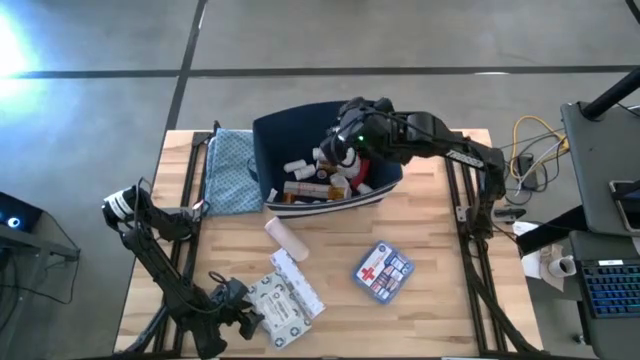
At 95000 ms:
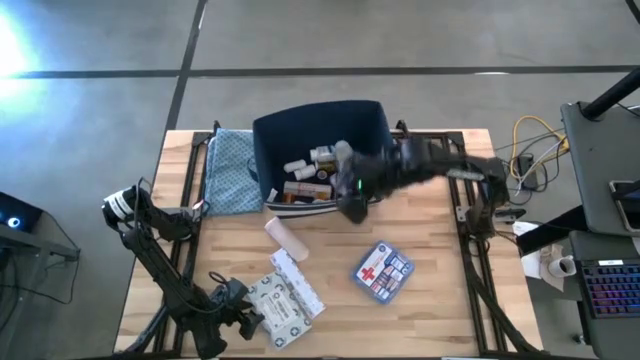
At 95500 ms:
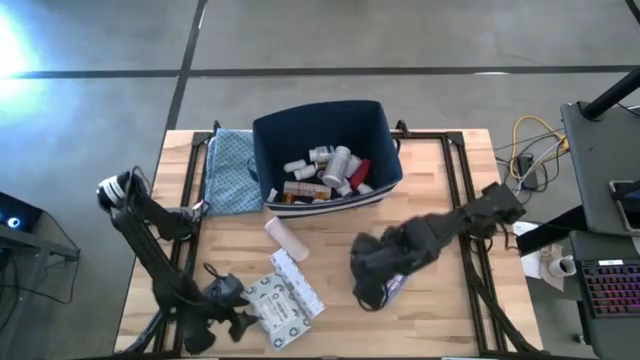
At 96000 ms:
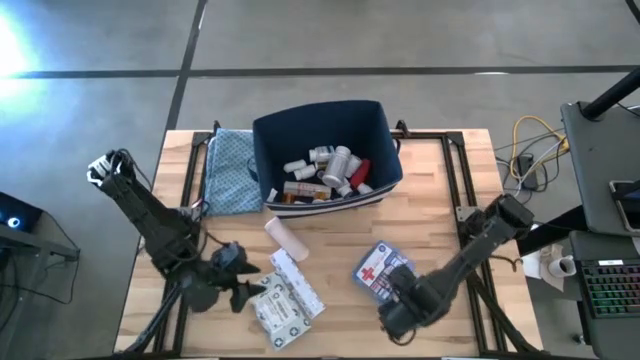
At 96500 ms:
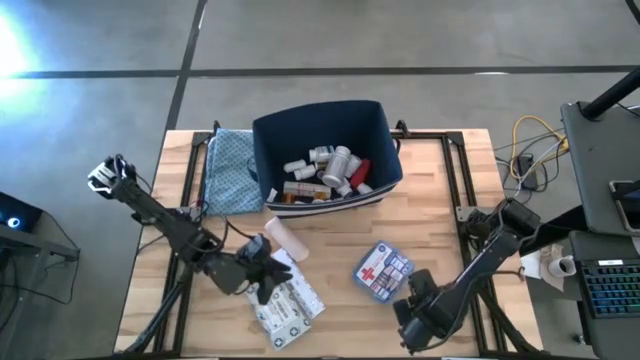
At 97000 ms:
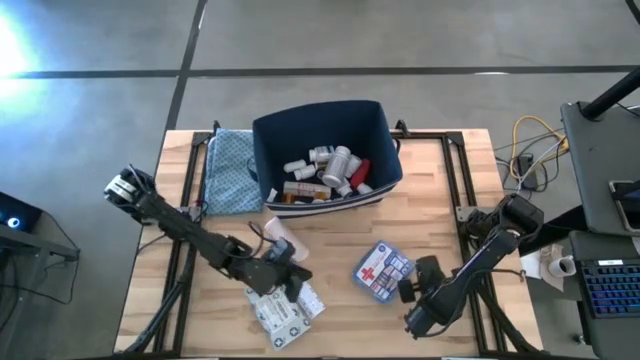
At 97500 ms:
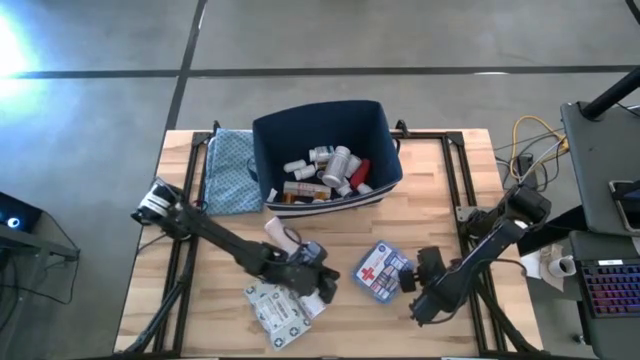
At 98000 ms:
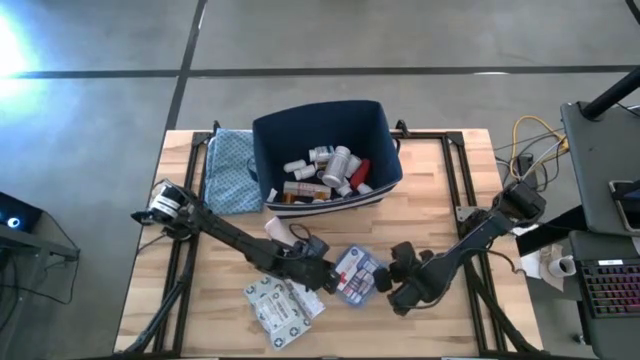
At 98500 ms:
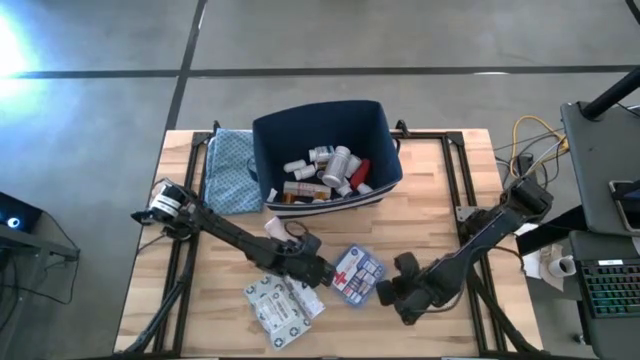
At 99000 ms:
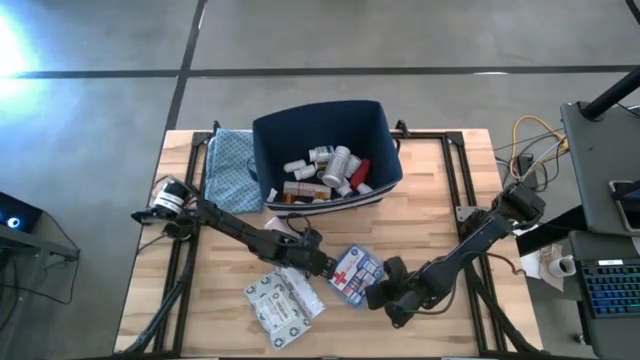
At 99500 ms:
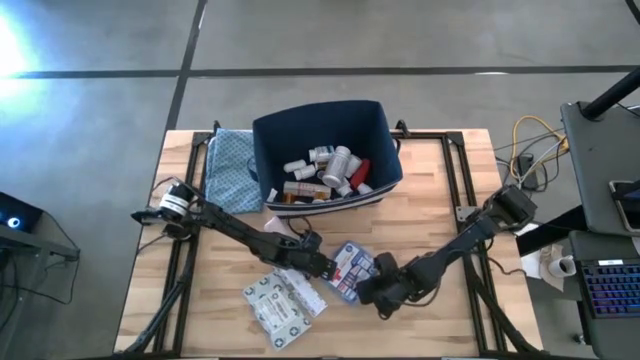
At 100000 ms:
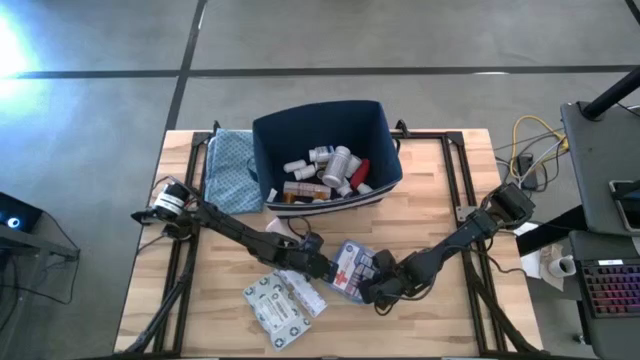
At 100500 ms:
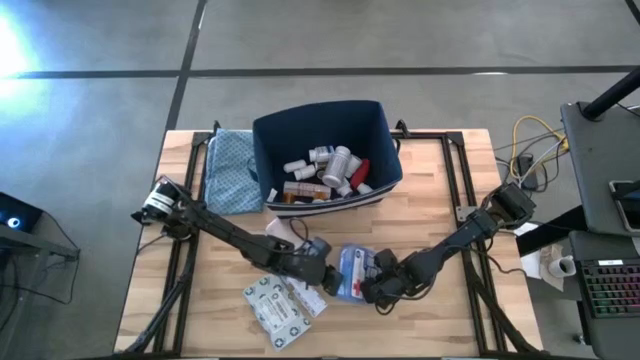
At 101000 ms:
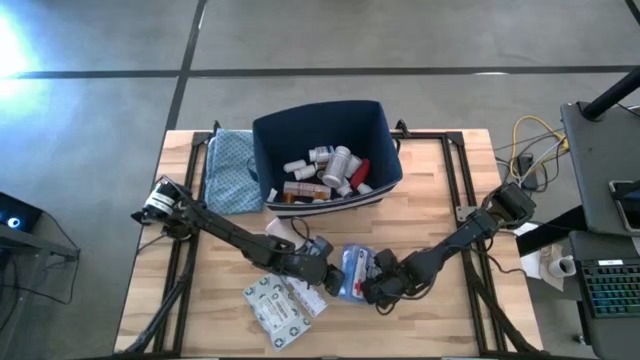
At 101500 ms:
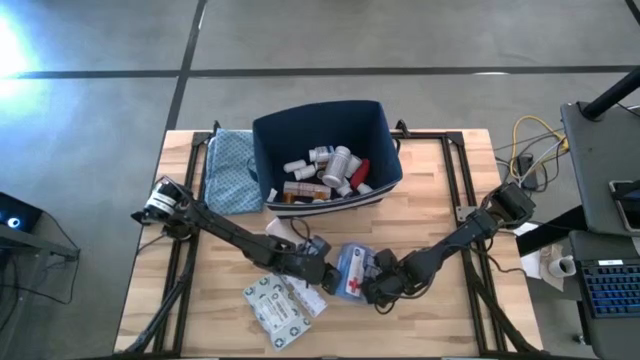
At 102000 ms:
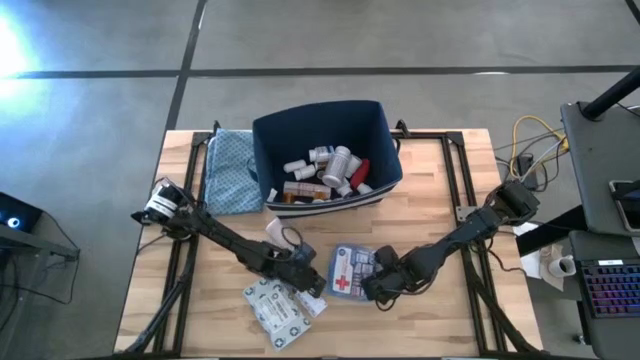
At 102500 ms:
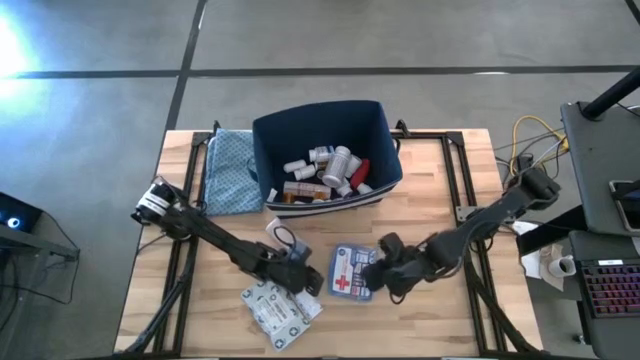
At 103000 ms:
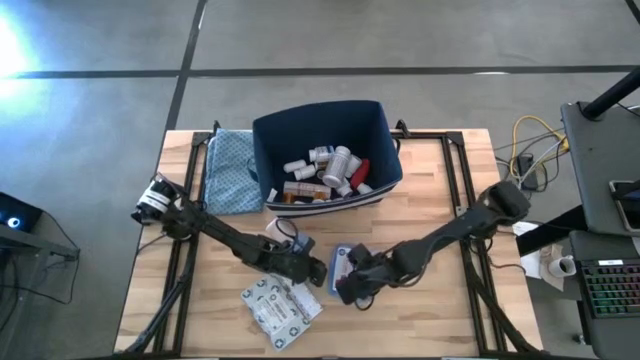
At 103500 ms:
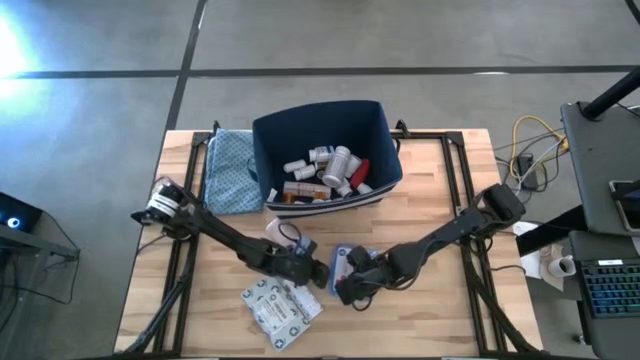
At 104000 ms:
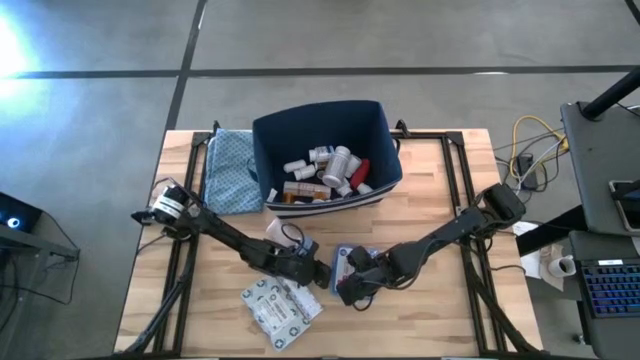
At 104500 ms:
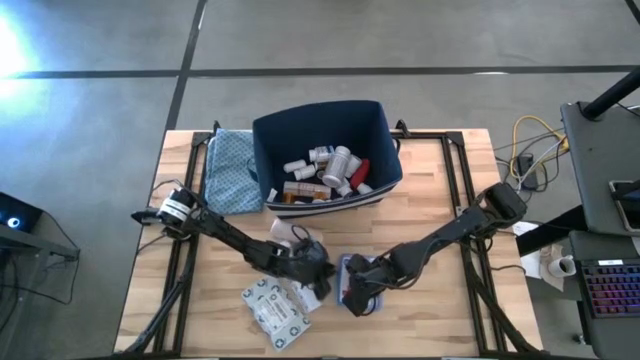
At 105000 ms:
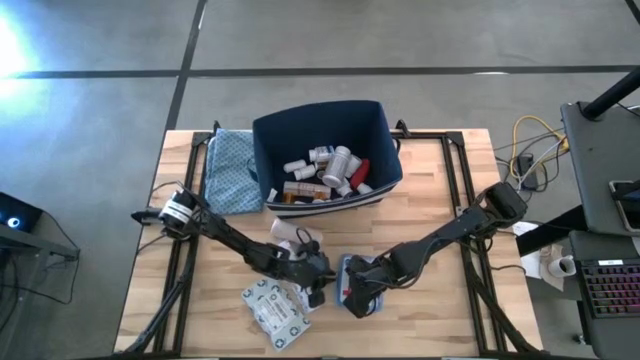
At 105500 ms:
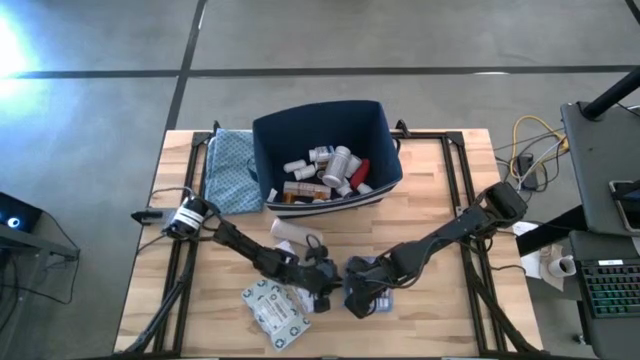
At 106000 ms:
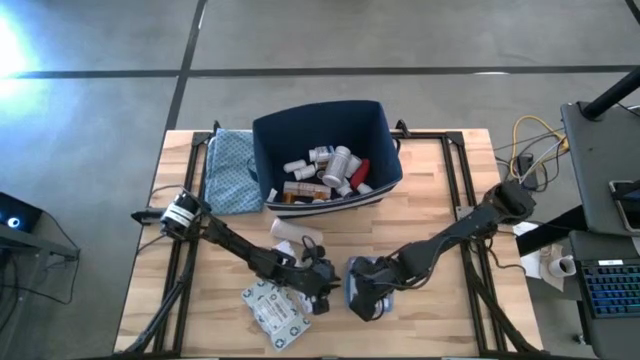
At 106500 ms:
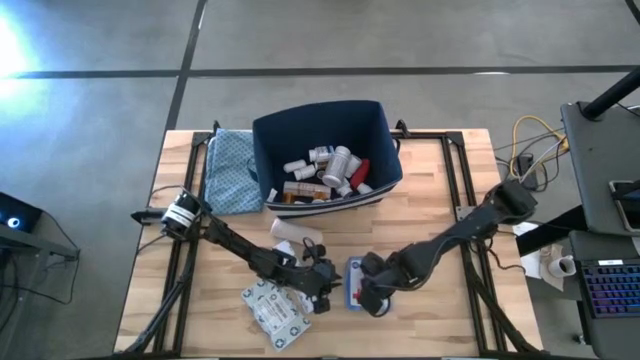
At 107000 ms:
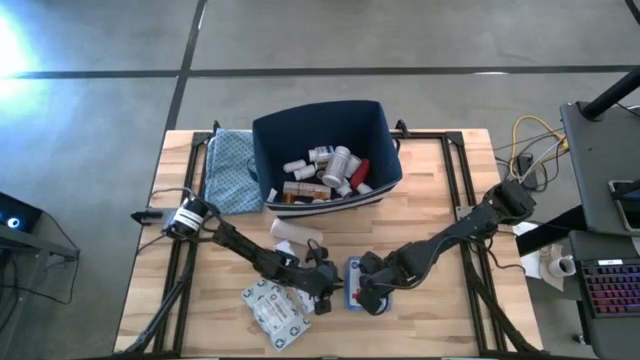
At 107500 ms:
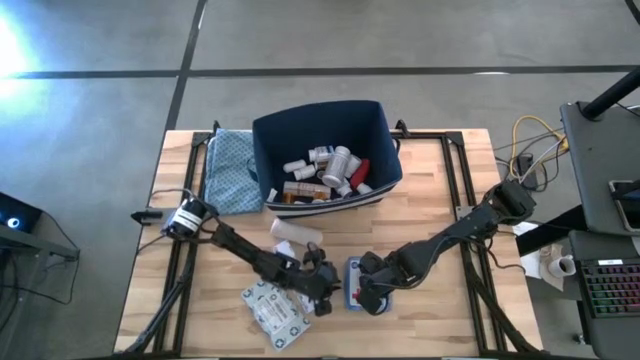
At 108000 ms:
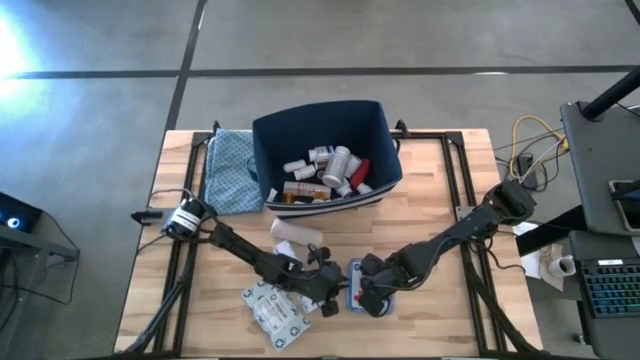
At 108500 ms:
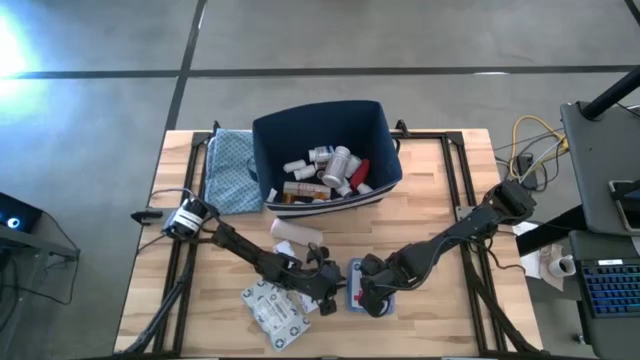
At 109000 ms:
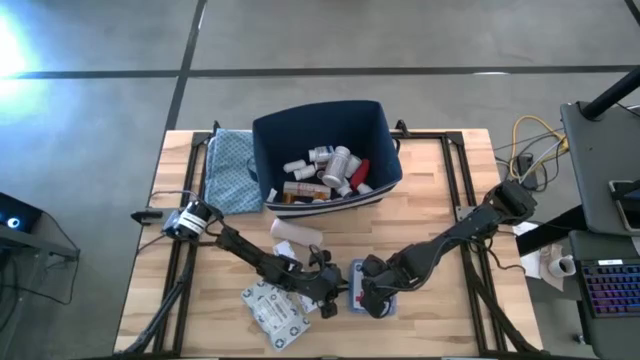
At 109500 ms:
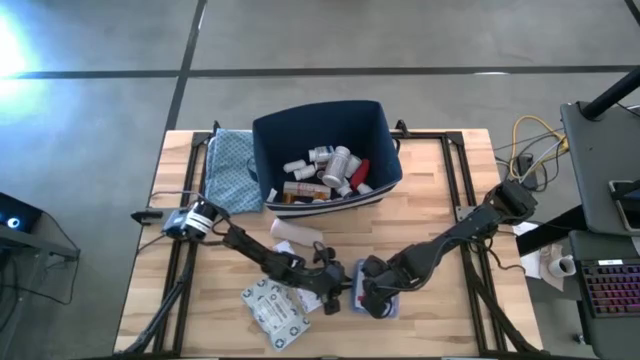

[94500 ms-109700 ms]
Task: Pick & place medical supplies in basket/bin
Put the blue first aid kit into the blue bin

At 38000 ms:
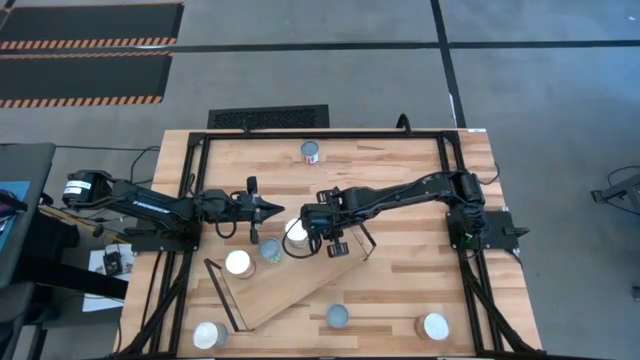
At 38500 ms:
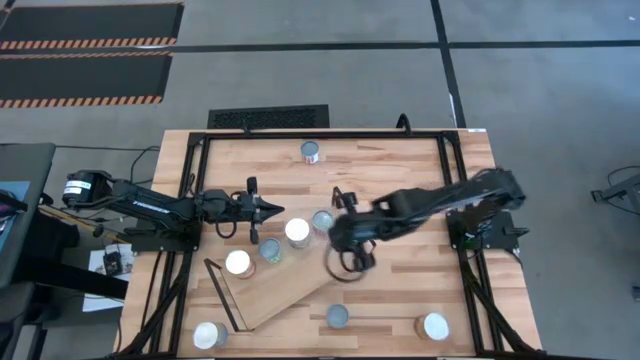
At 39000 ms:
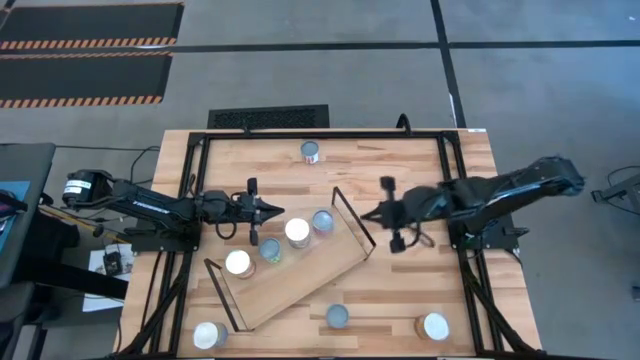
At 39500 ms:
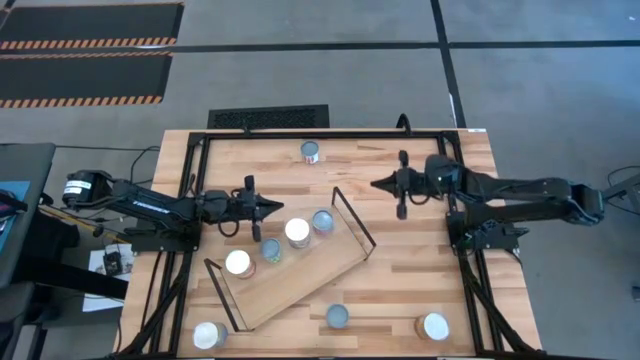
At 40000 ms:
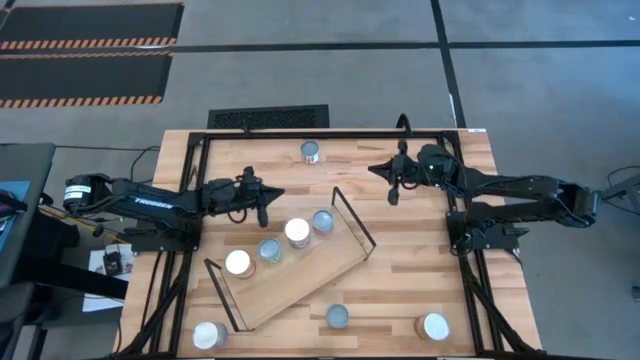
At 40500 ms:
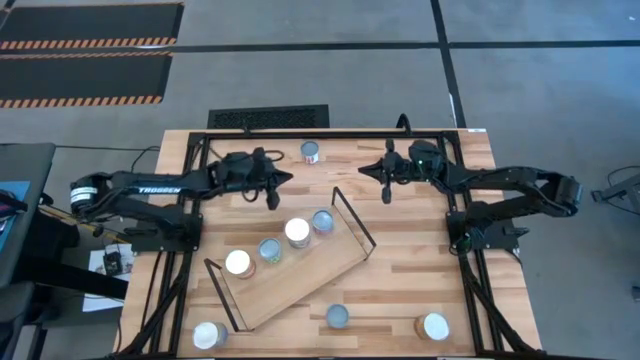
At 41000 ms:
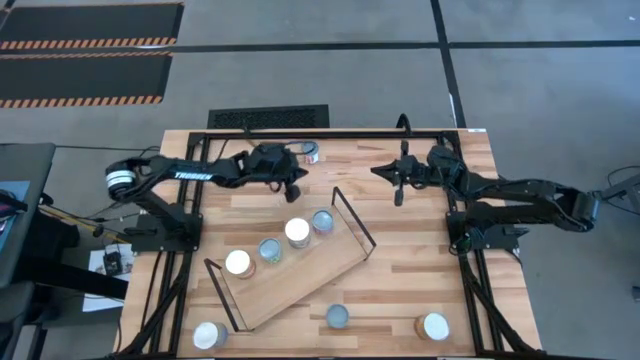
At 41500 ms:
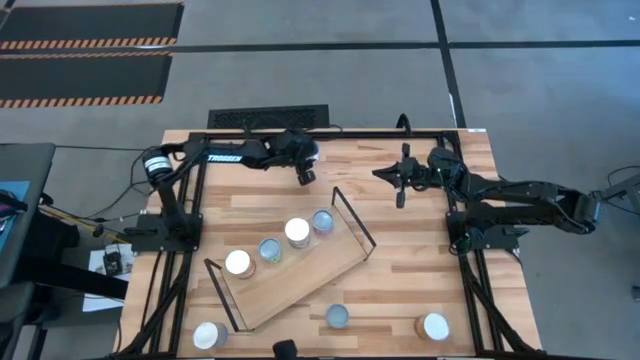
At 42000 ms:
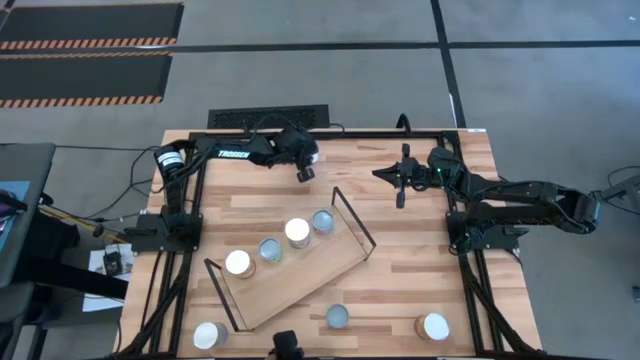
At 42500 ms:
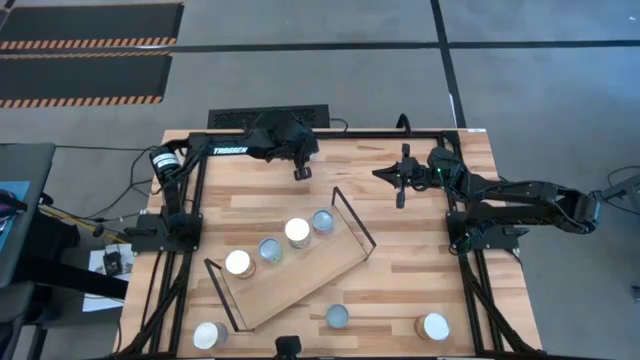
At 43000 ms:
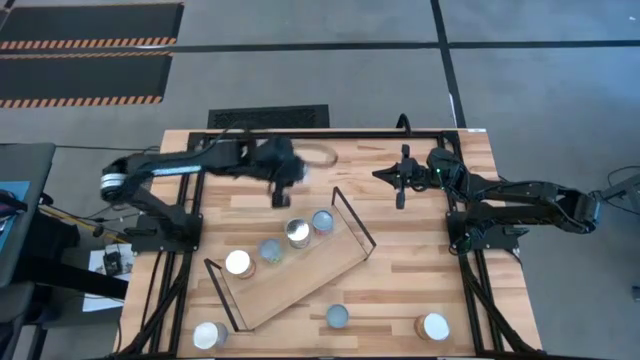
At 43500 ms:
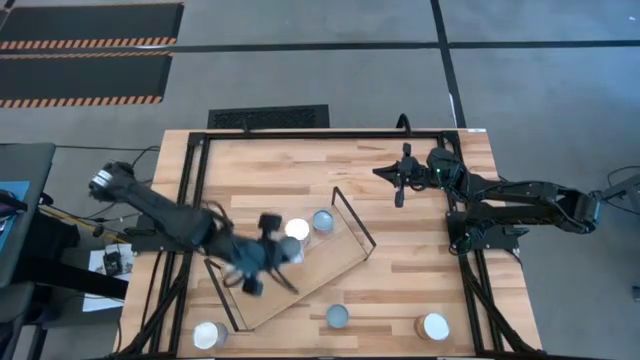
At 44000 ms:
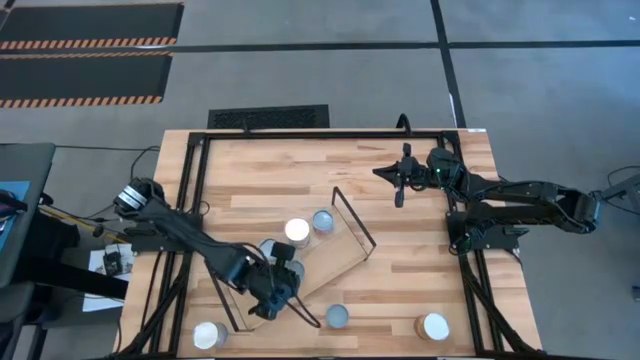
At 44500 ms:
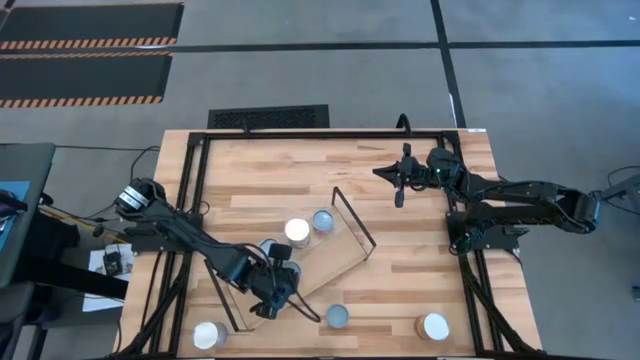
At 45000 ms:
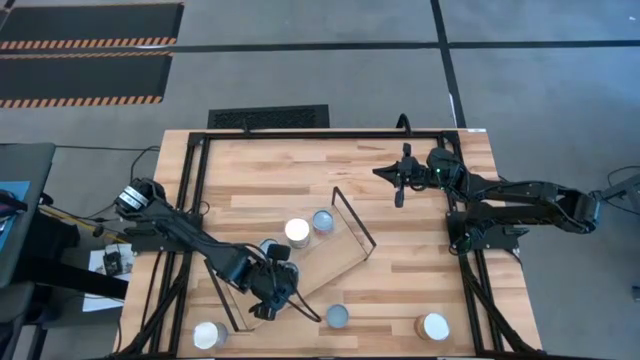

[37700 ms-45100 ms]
Task: Pick and place cans onto a shelf
Put the canned carrot on the shelf
